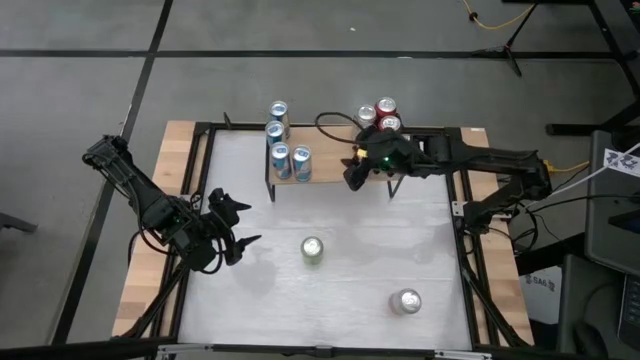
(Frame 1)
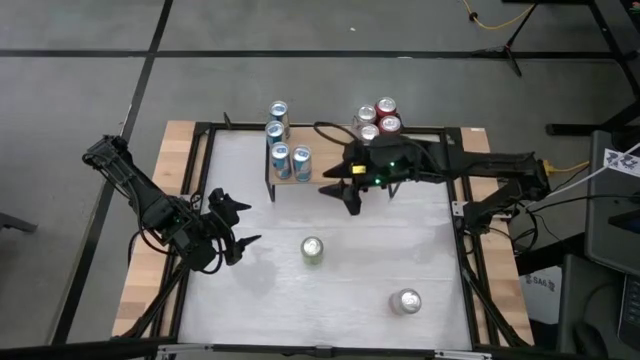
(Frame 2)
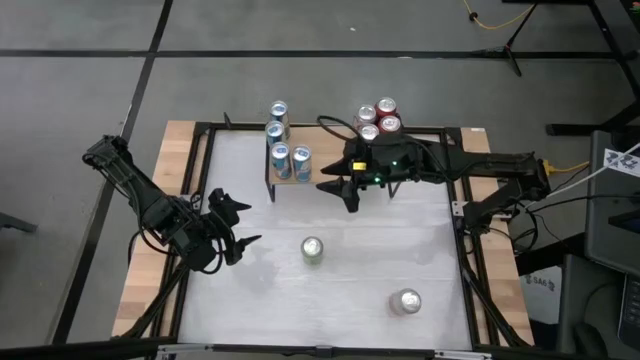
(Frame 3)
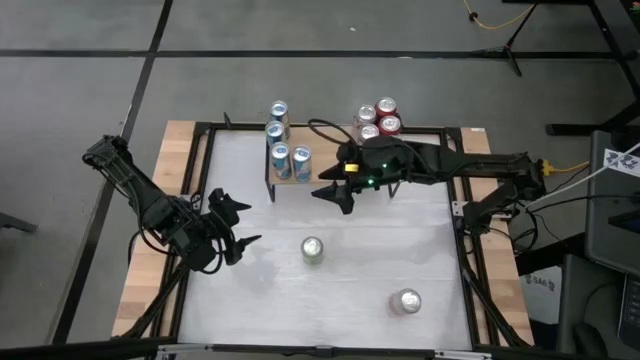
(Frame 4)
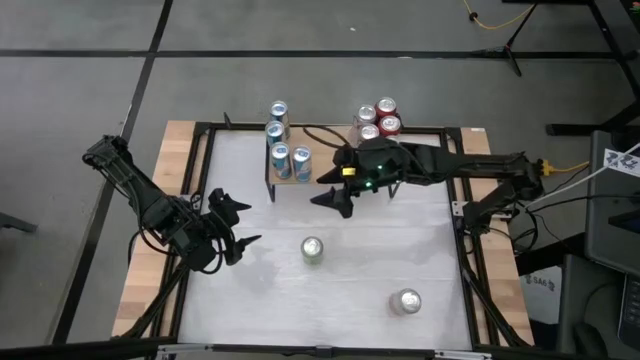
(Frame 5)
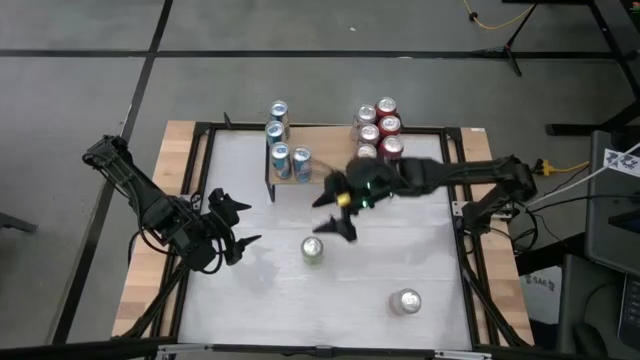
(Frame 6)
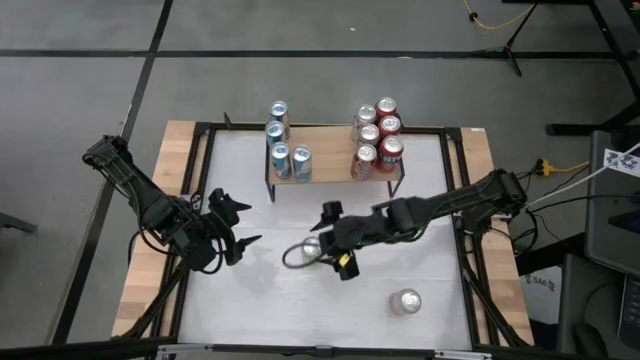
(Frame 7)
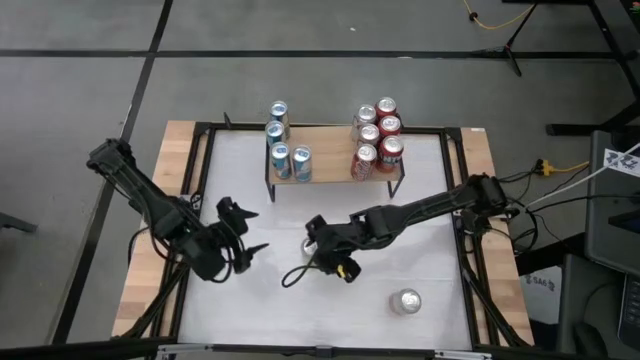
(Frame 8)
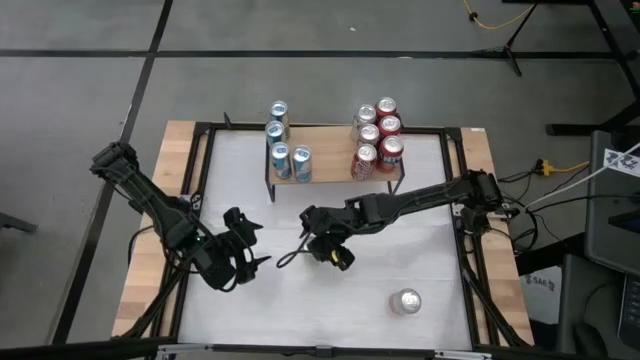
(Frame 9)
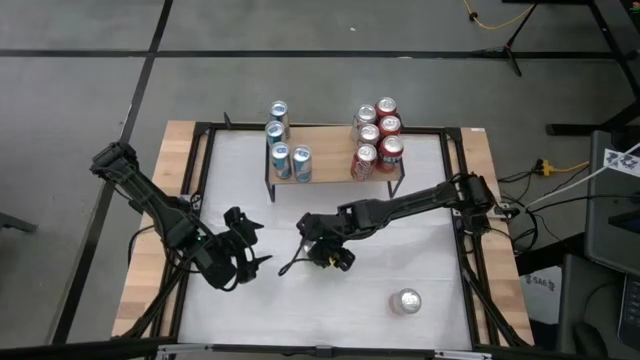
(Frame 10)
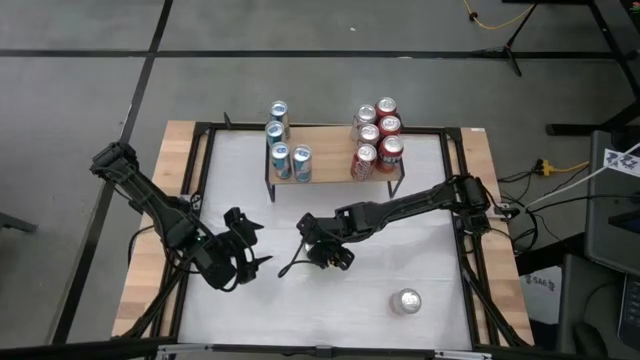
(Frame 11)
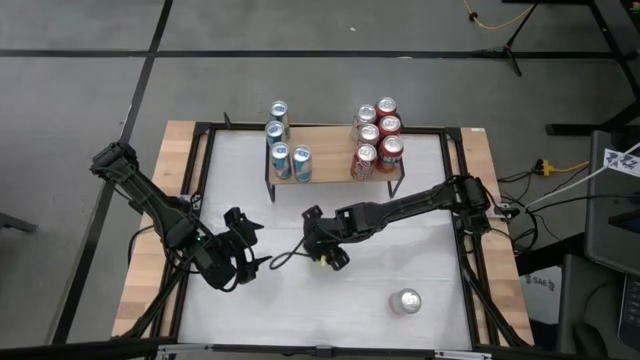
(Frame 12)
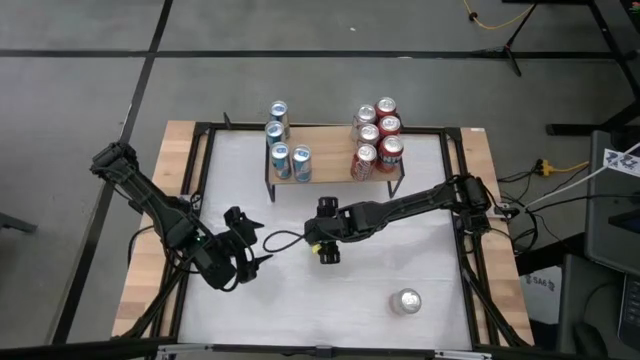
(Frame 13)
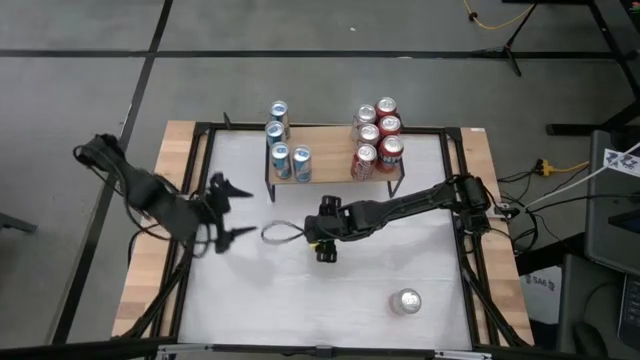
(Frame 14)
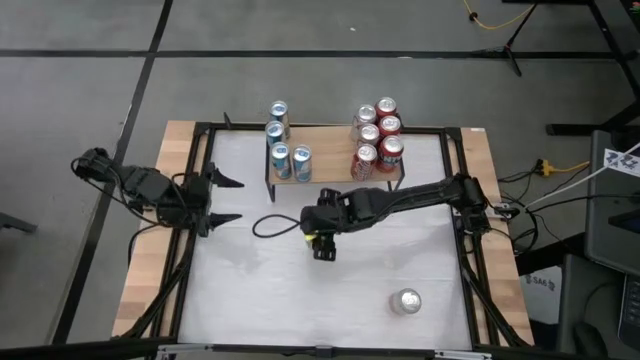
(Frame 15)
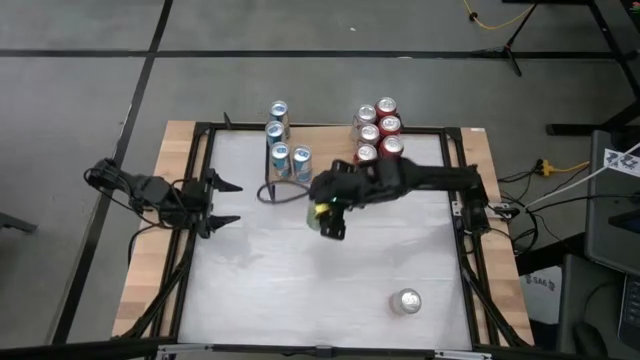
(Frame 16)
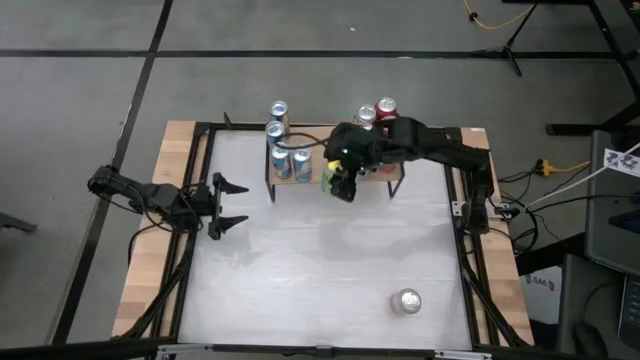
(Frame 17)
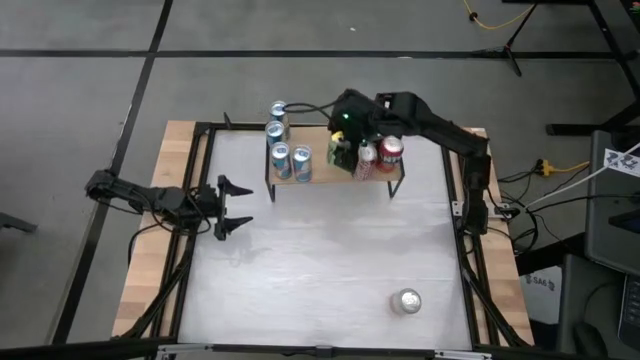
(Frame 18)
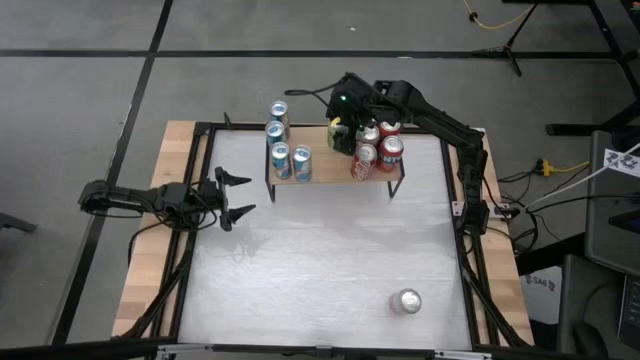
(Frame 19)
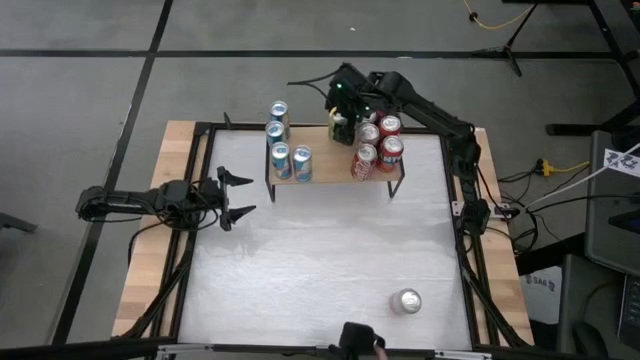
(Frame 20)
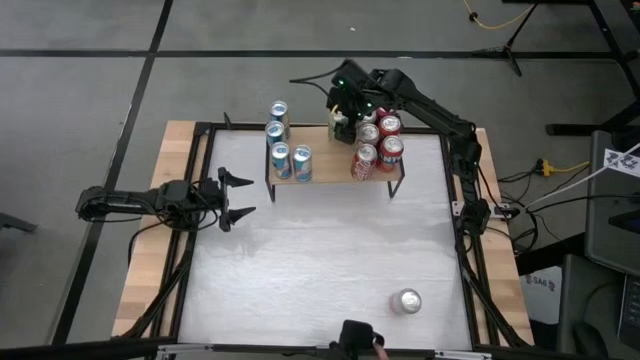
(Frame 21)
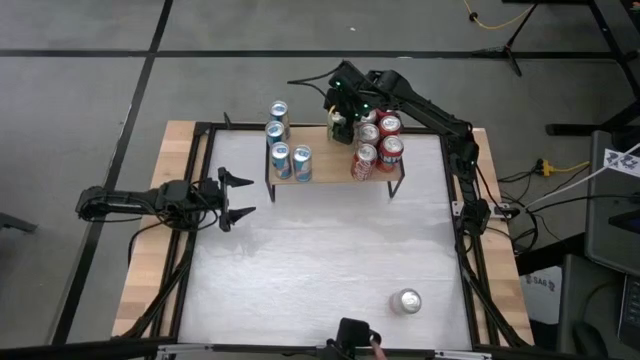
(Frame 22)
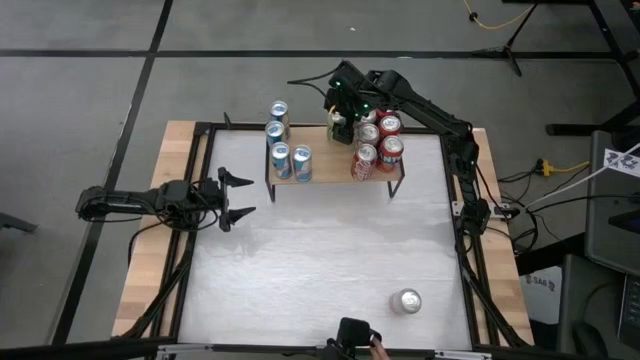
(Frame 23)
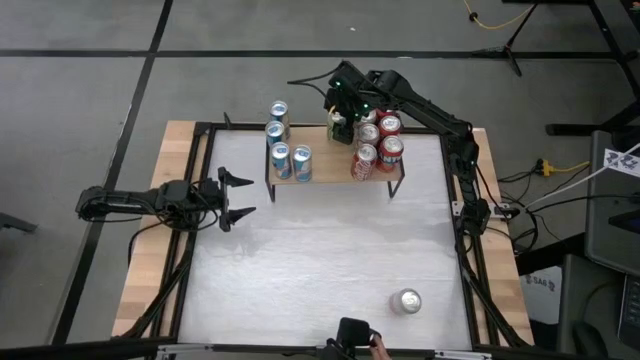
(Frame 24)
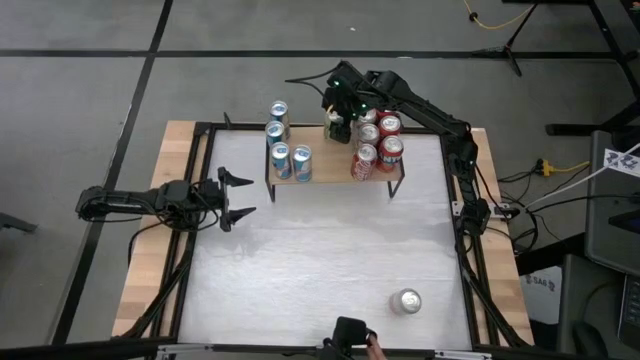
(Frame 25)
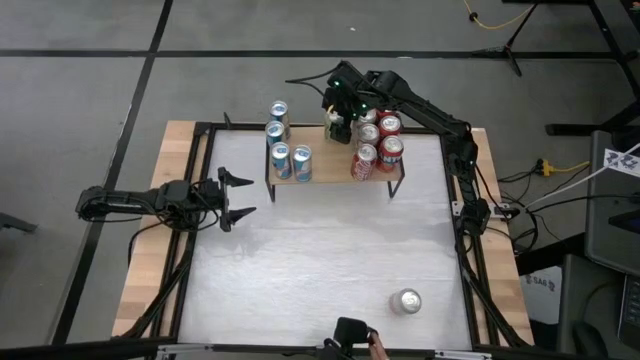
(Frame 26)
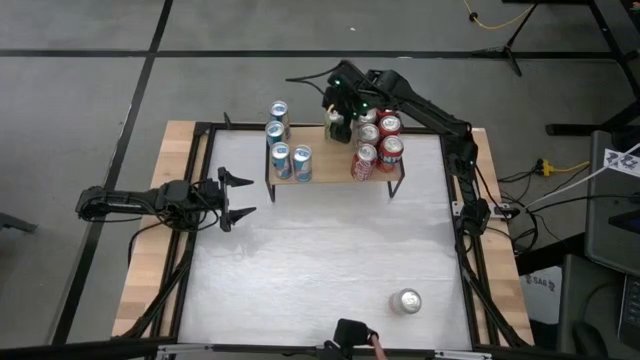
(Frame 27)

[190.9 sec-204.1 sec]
Task: Sort soda cans
Put the green soda can on the shelf

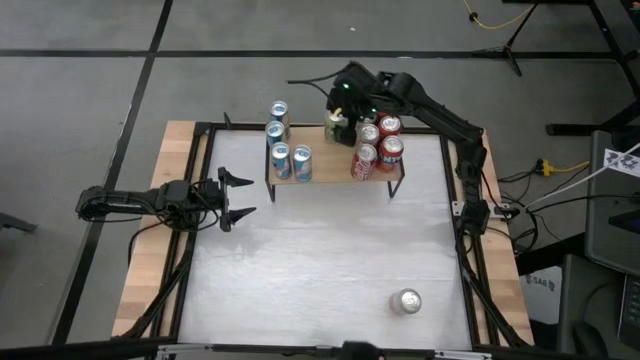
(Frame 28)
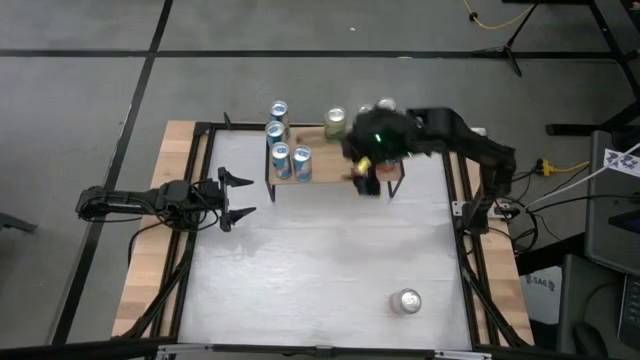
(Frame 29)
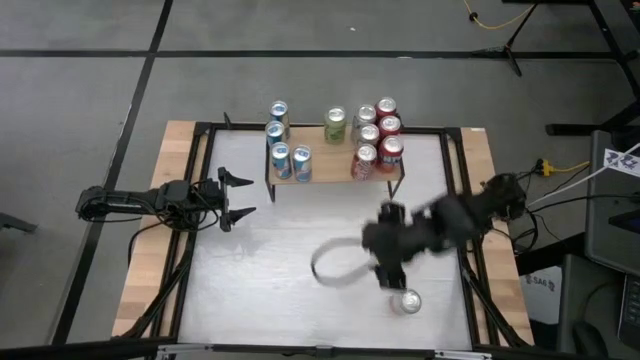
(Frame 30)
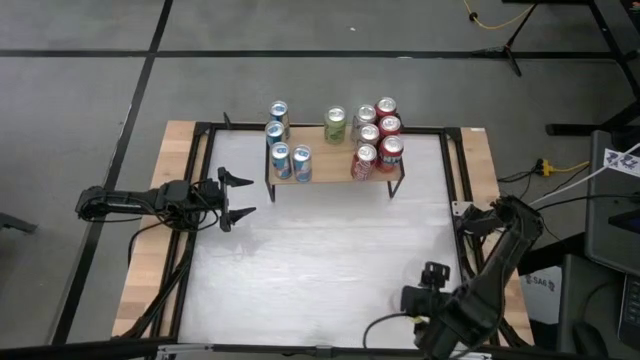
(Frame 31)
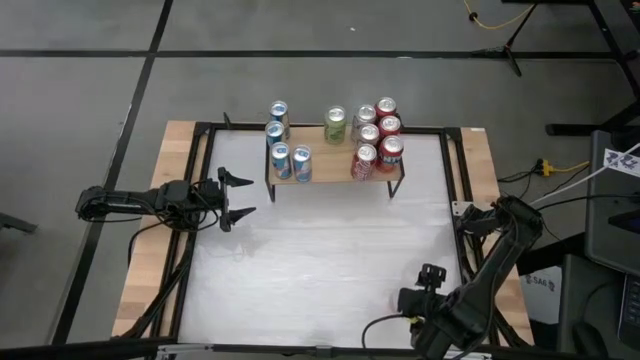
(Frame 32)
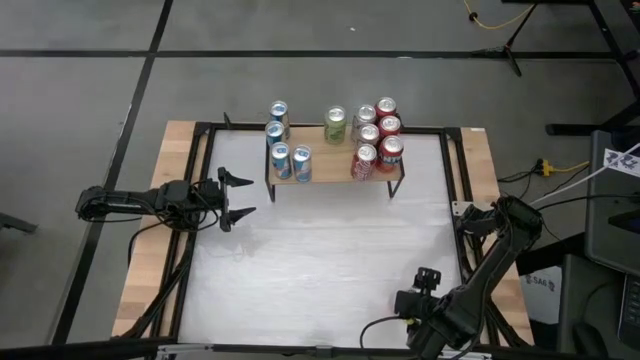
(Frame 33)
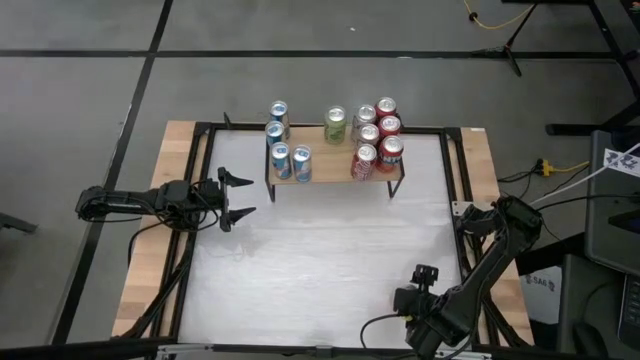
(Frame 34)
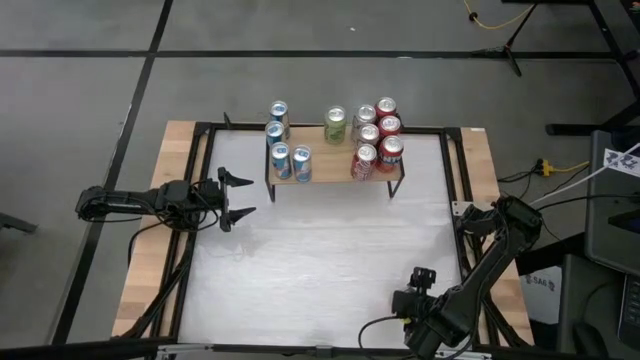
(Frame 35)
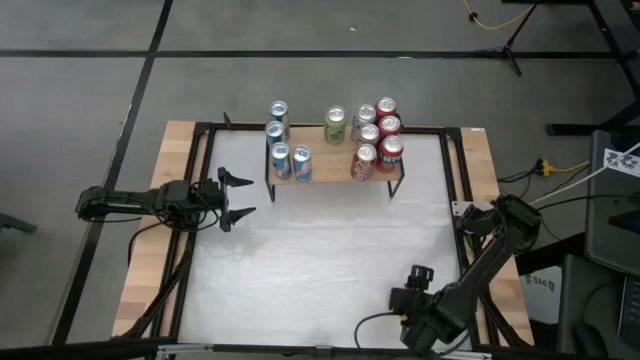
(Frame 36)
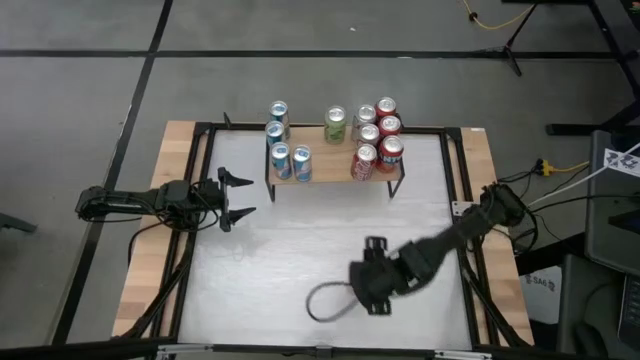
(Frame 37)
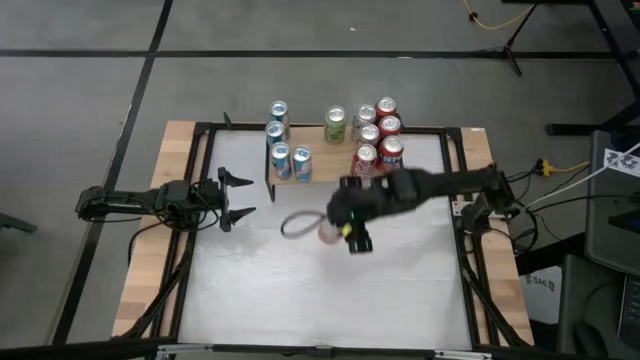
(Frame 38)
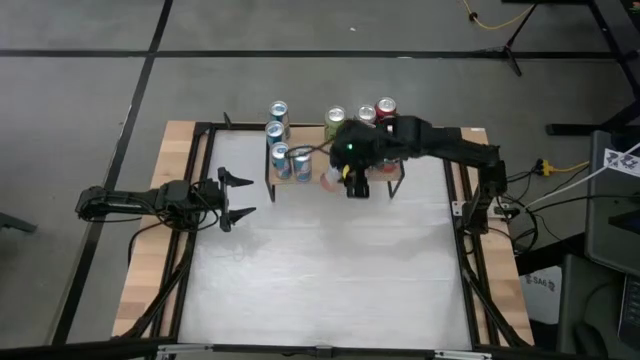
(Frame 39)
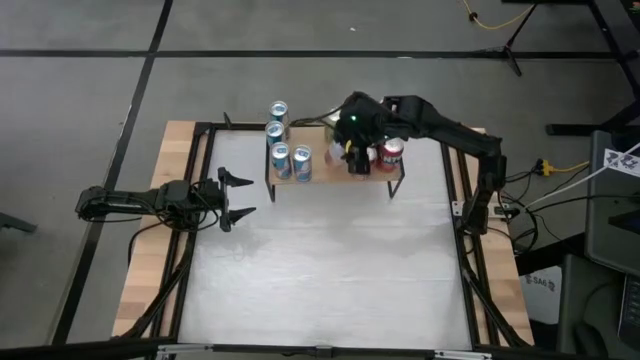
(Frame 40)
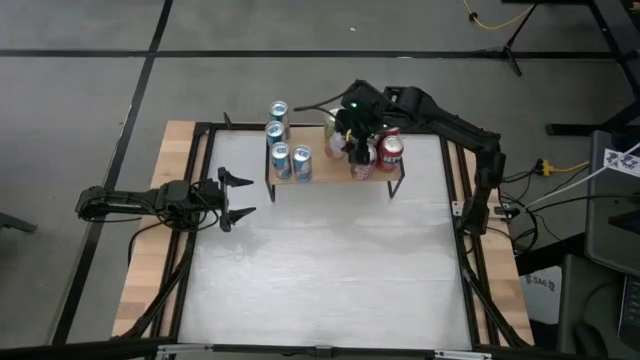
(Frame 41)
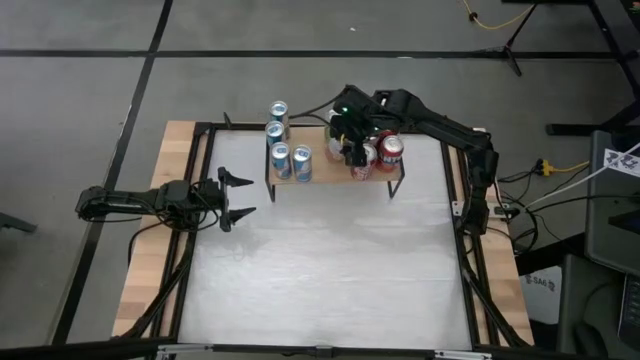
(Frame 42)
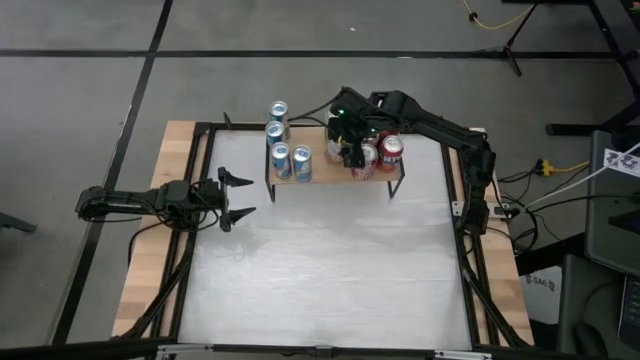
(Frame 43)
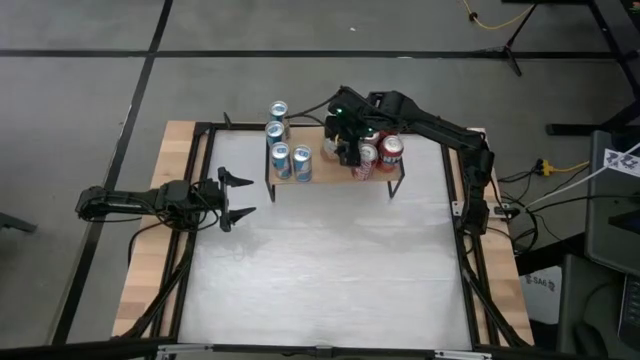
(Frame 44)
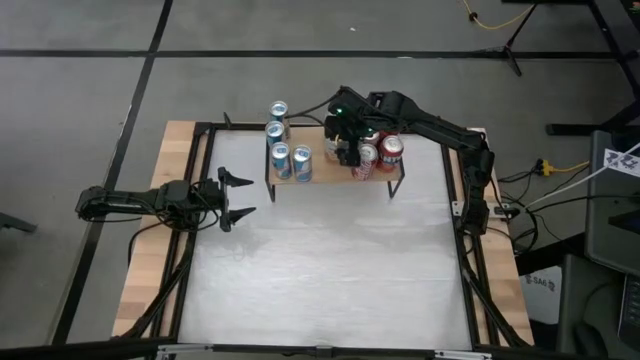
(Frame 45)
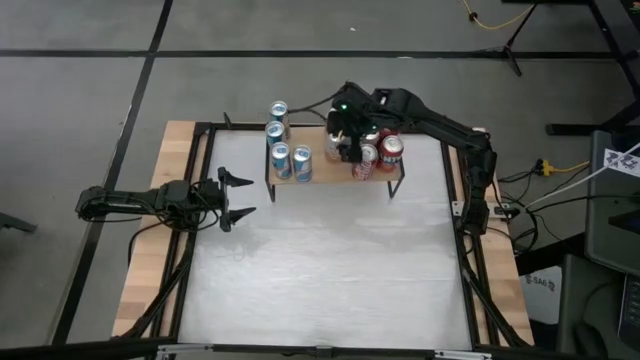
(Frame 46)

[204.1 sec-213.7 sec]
Put the orange-white soda can on the shelf aligned with the green soda can
